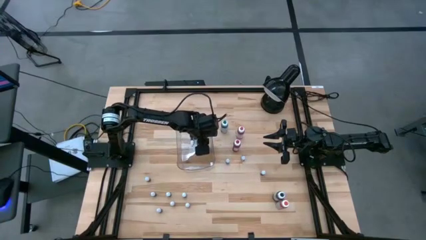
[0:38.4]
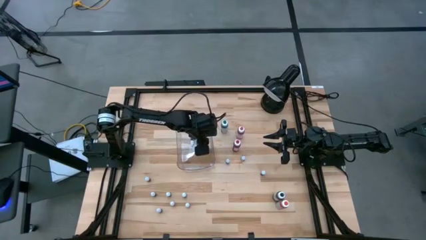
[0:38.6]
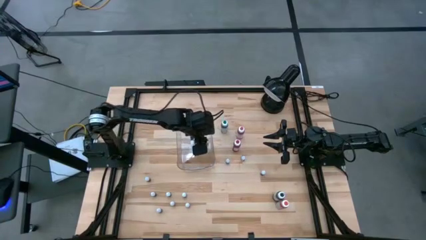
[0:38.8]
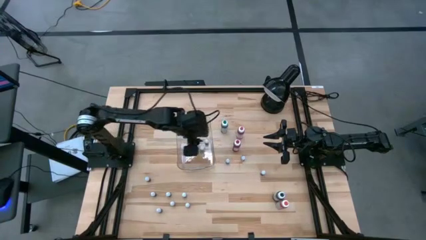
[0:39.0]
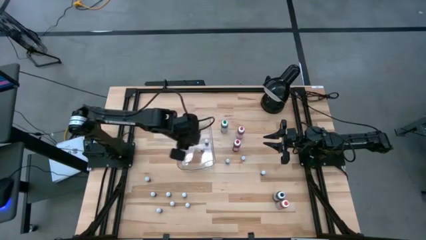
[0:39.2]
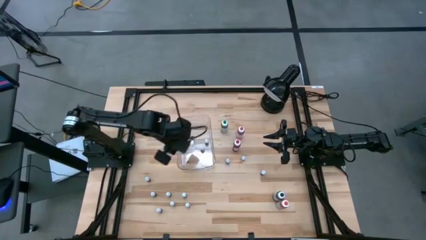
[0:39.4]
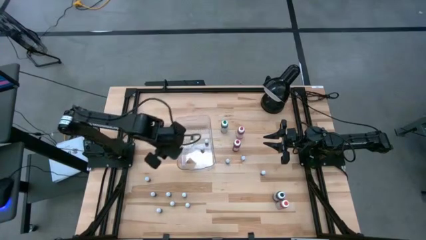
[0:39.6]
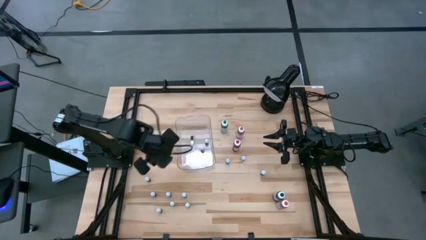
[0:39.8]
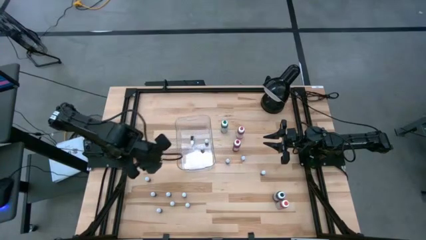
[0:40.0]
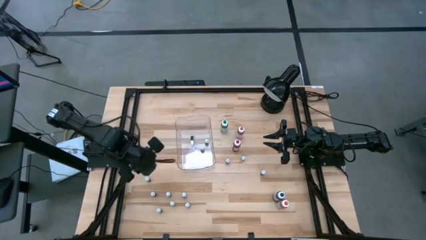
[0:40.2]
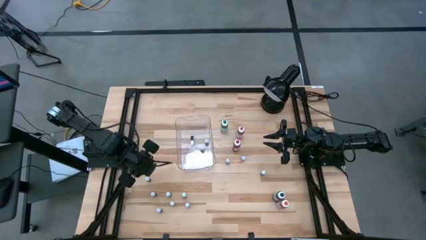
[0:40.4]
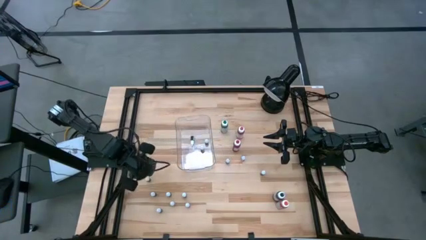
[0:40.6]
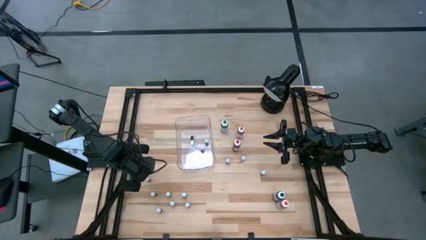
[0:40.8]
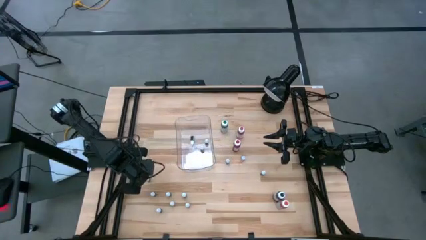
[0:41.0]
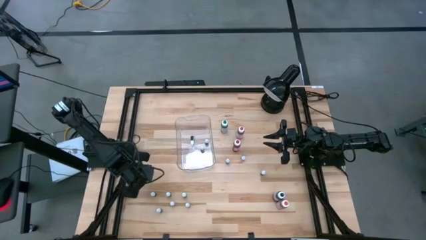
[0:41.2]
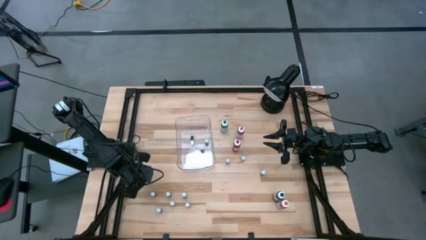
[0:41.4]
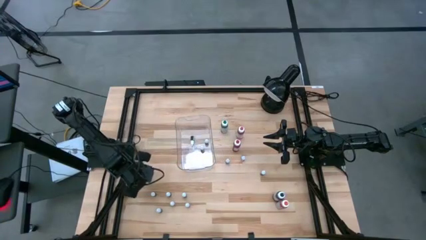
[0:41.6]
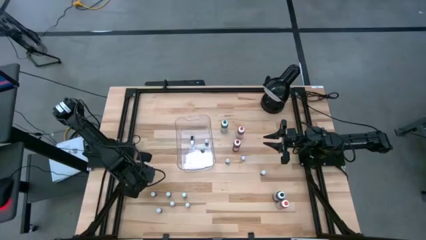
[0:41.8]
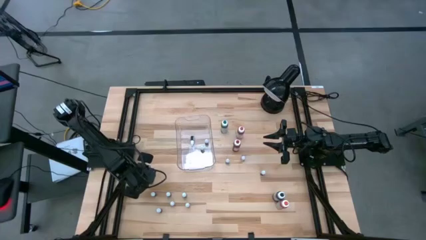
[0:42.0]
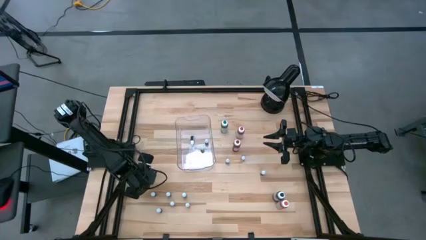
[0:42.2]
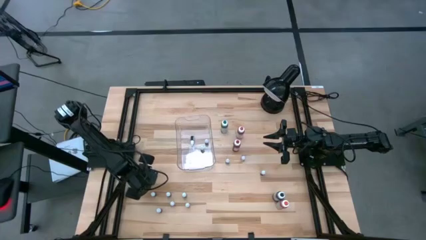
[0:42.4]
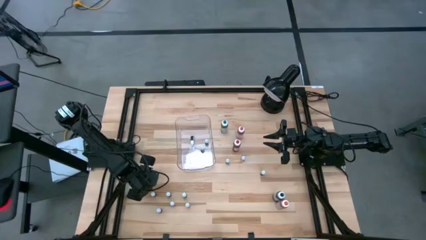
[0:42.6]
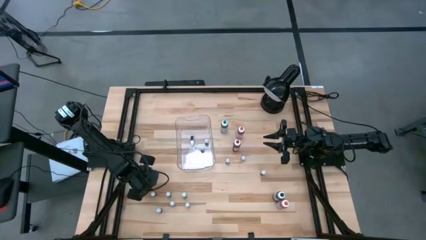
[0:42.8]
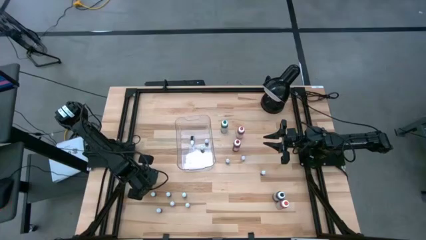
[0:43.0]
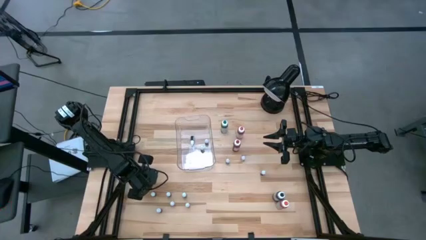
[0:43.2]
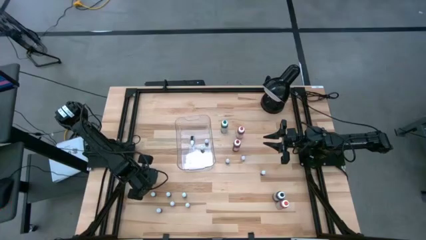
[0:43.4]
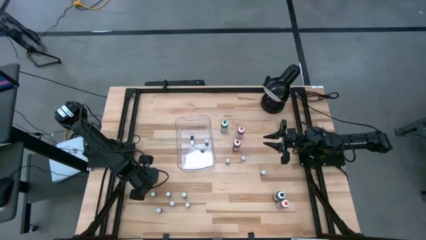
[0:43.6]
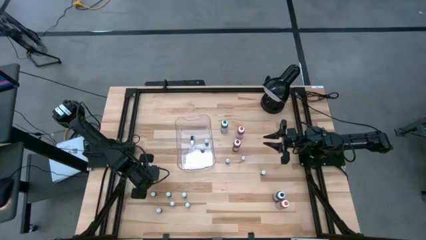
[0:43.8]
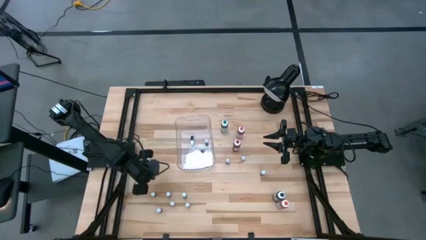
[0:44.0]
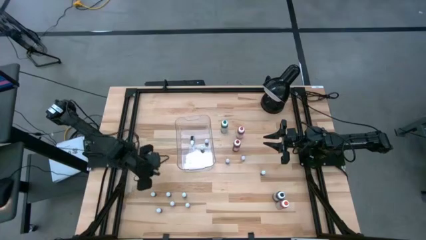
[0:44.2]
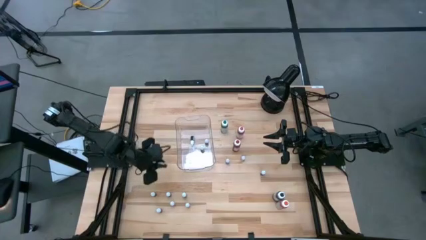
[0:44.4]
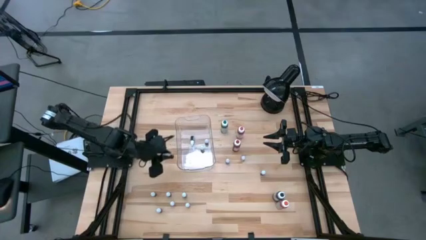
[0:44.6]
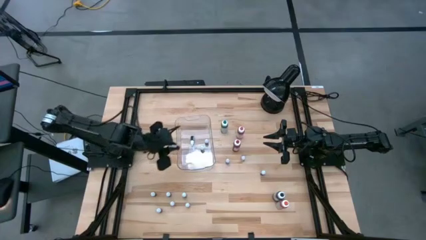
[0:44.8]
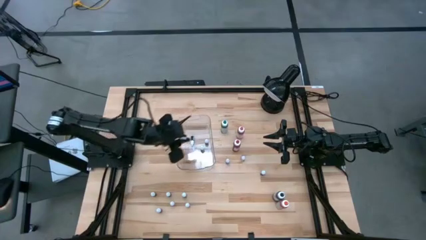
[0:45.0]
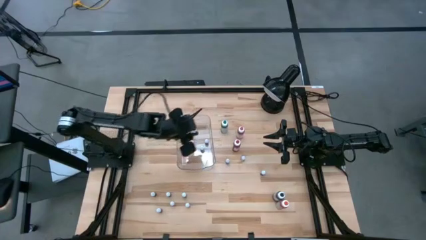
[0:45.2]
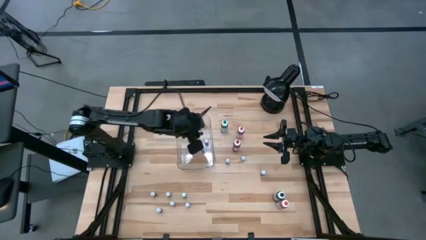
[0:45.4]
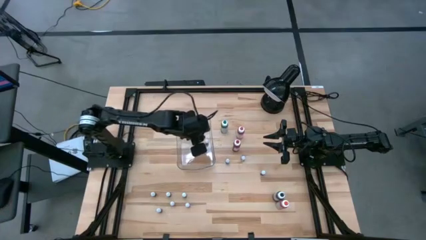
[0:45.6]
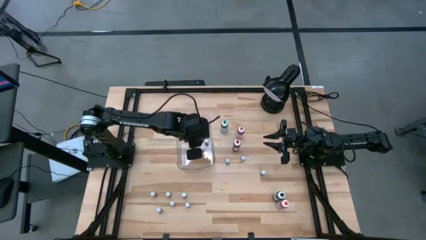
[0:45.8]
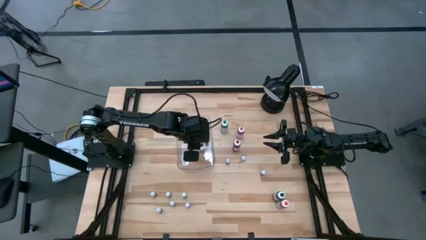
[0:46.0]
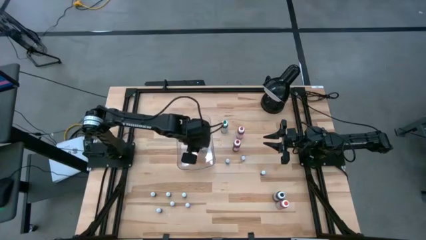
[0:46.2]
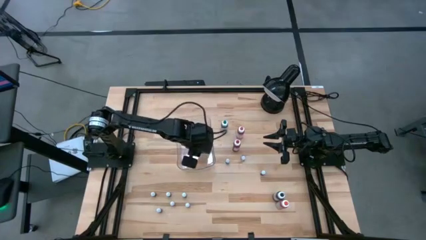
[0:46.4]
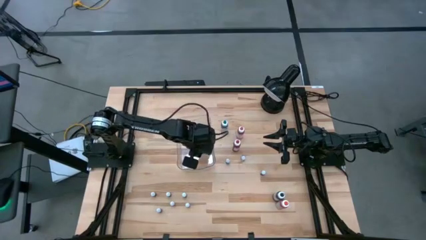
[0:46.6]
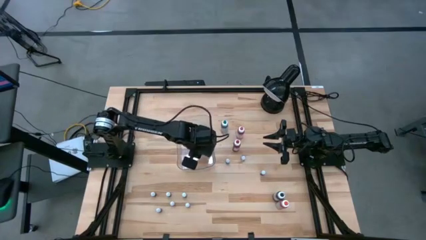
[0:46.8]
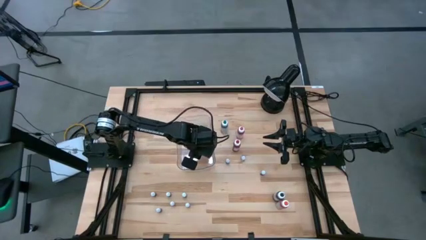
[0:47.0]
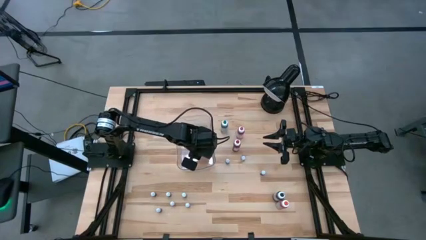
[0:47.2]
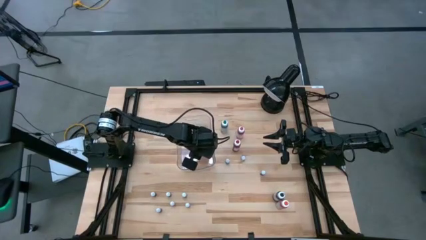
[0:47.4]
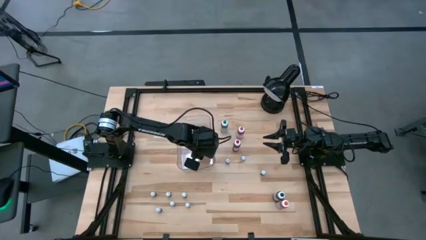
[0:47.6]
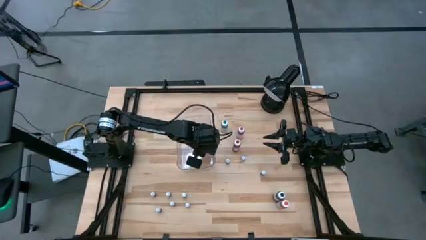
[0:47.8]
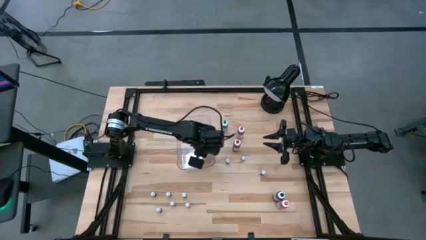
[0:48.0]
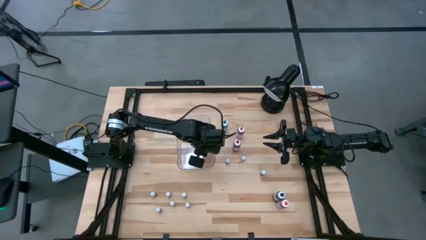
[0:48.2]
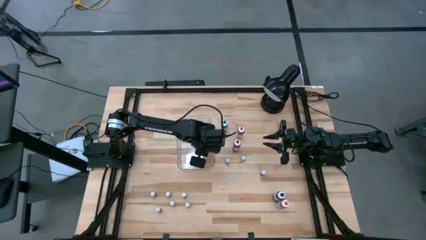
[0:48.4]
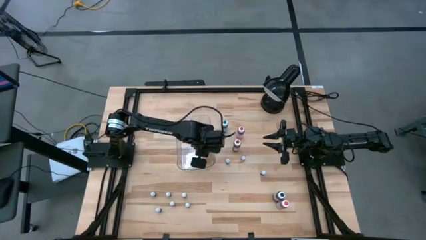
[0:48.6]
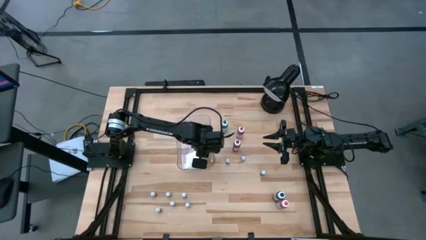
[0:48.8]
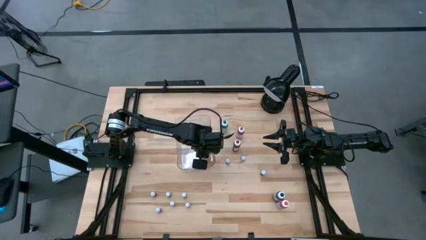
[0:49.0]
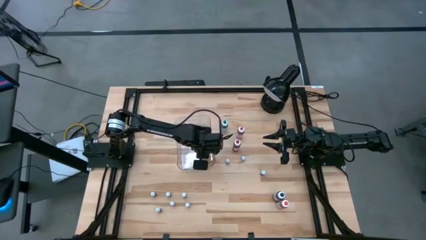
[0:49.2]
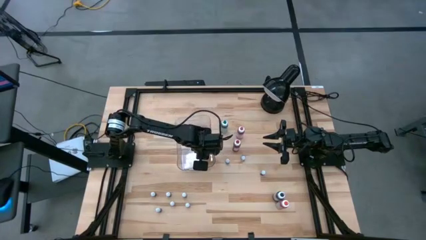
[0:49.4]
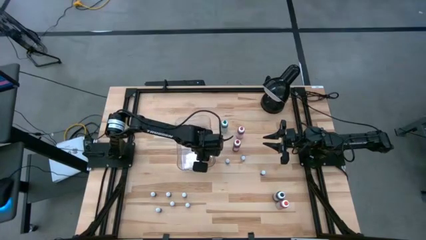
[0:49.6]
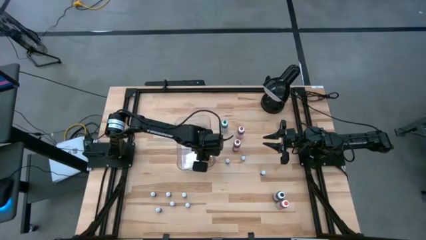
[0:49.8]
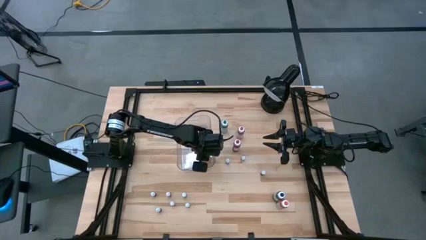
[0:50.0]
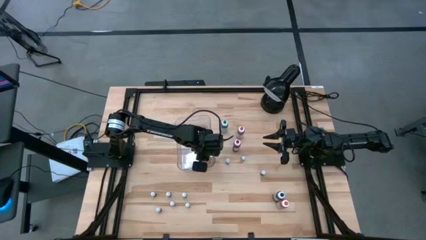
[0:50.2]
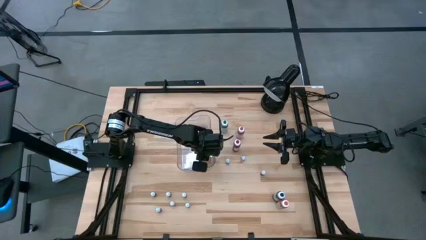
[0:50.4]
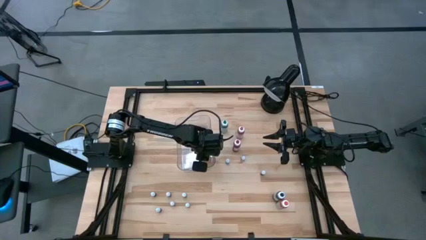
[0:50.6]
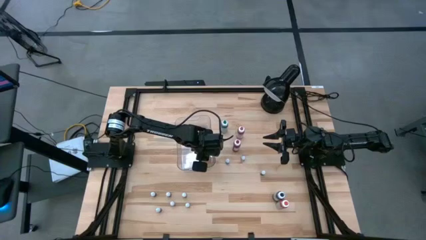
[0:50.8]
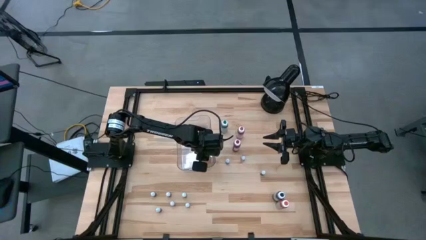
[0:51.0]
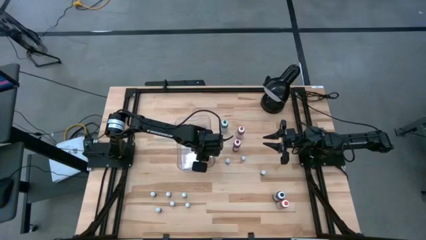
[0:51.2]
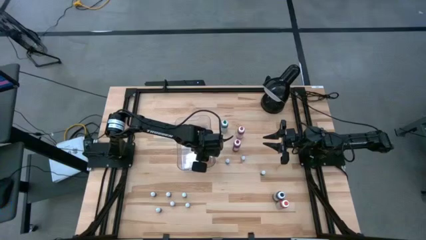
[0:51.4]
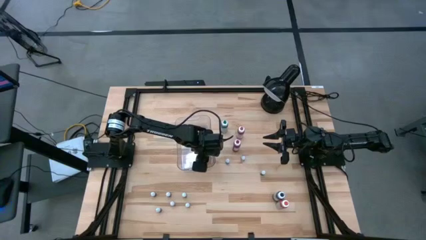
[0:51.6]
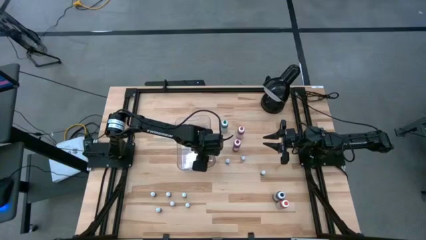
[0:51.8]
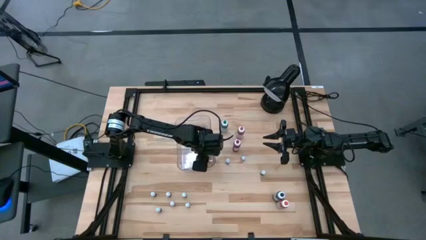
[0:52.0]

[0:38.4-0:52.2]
Task: Pick & Place food coloring
Put the top small black food coloring bottle into the transparent bin
